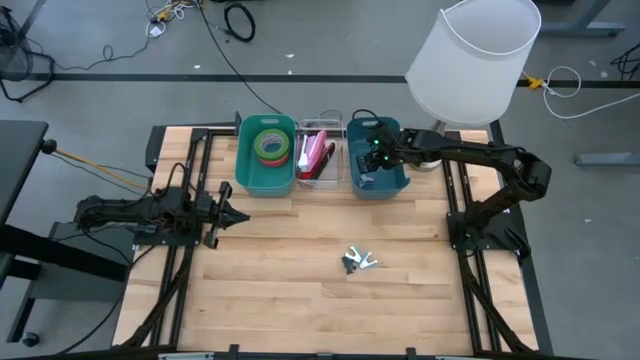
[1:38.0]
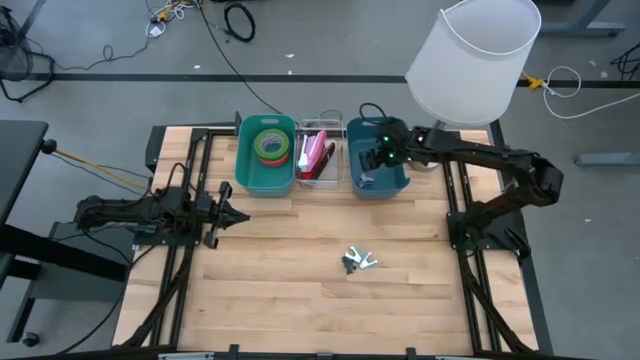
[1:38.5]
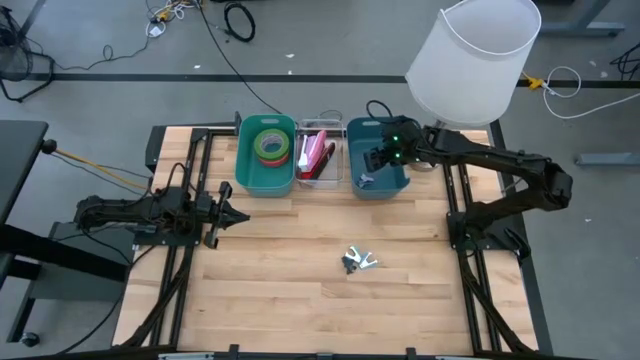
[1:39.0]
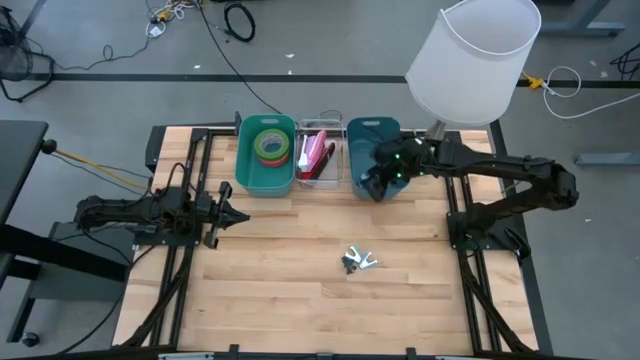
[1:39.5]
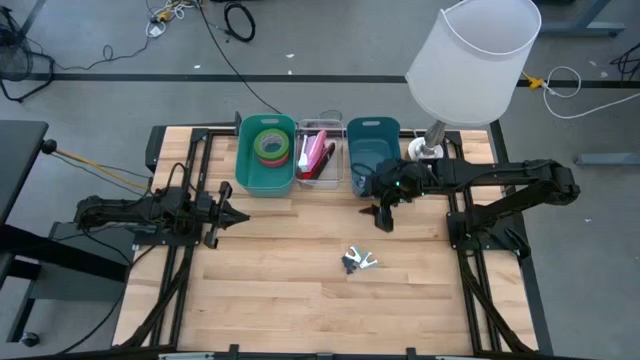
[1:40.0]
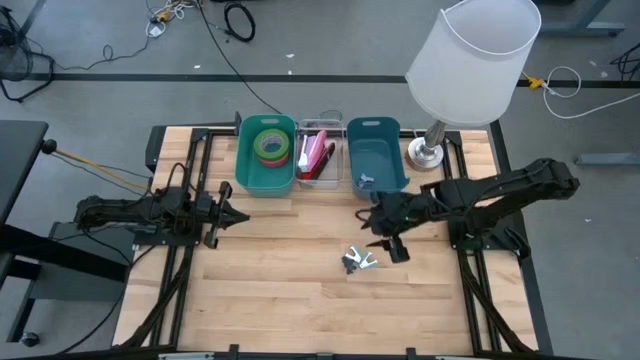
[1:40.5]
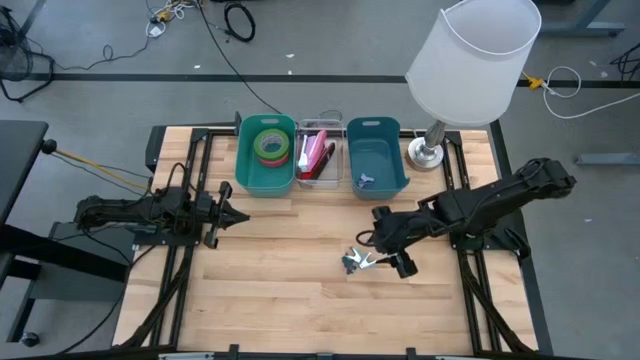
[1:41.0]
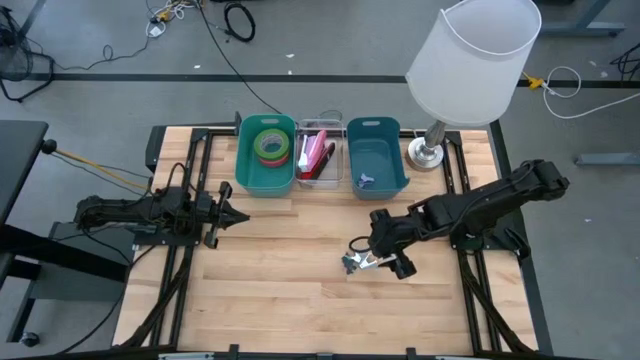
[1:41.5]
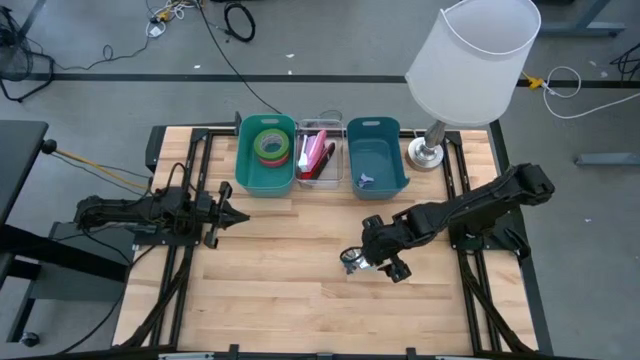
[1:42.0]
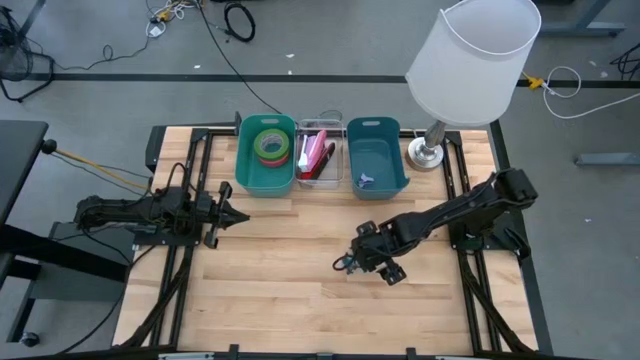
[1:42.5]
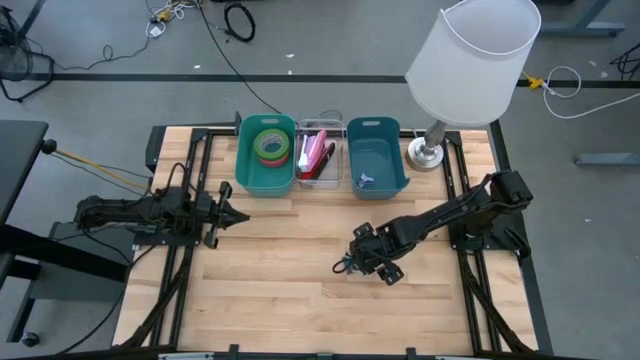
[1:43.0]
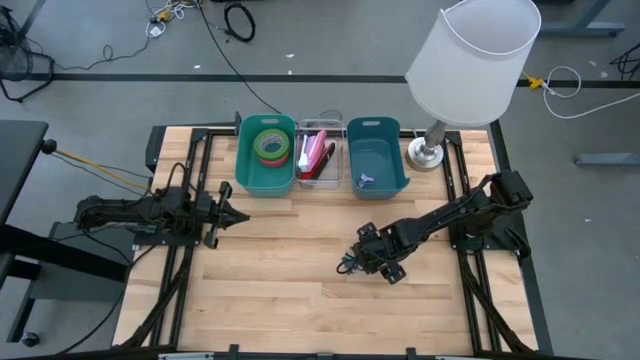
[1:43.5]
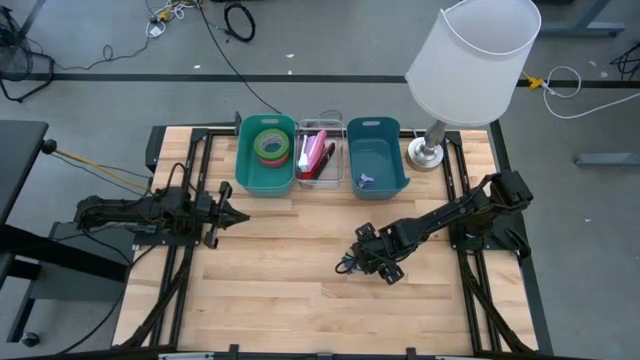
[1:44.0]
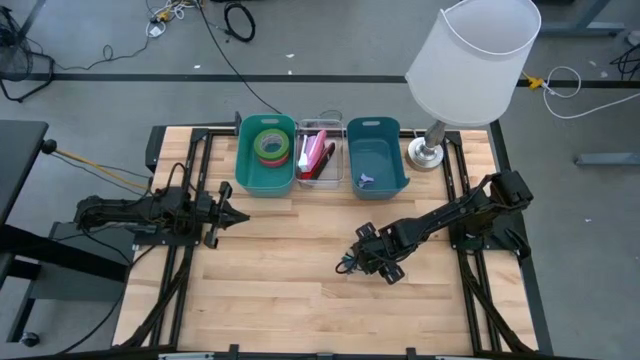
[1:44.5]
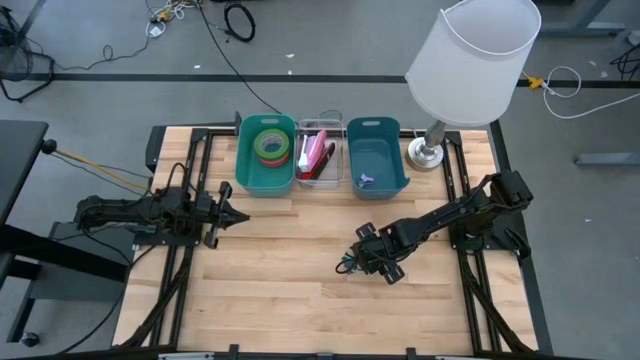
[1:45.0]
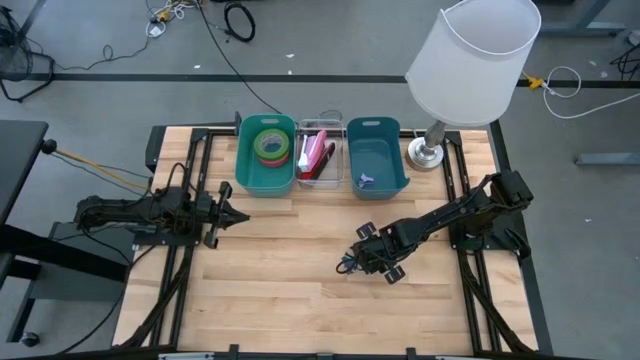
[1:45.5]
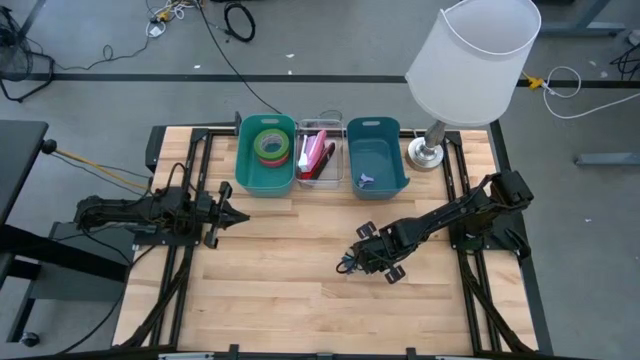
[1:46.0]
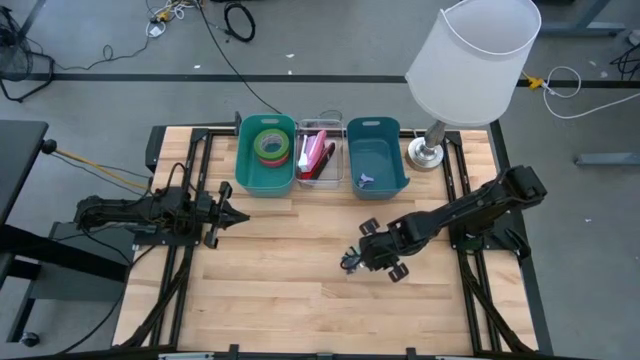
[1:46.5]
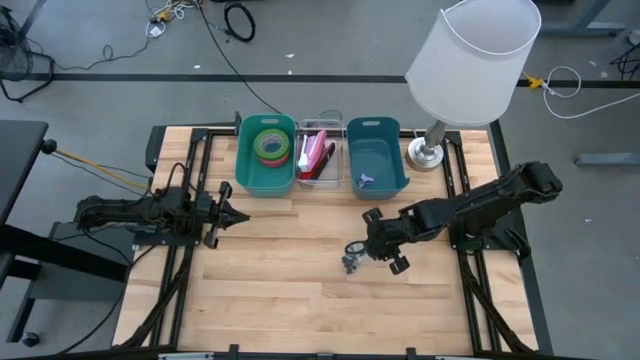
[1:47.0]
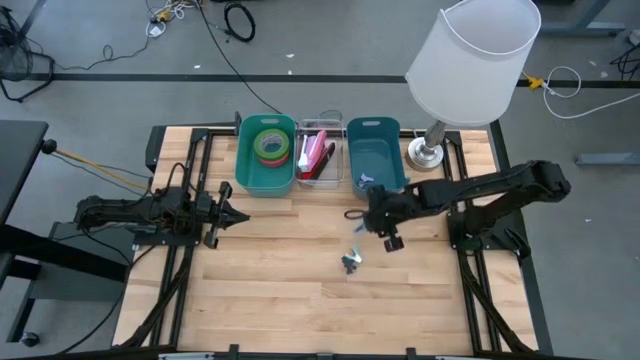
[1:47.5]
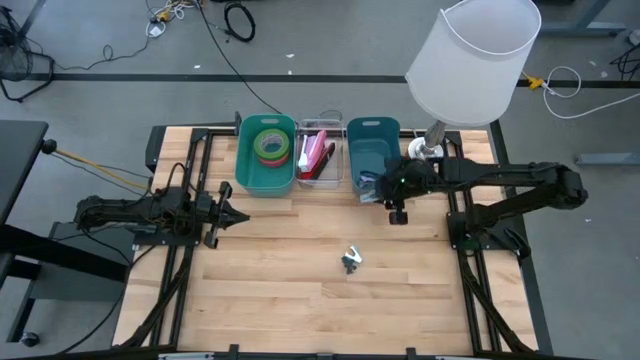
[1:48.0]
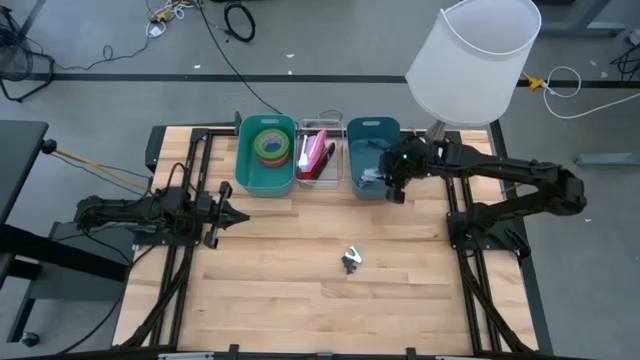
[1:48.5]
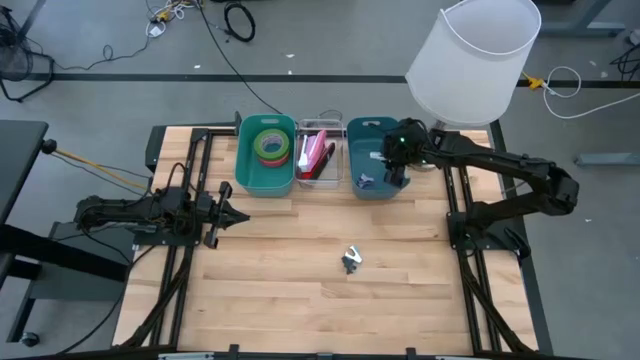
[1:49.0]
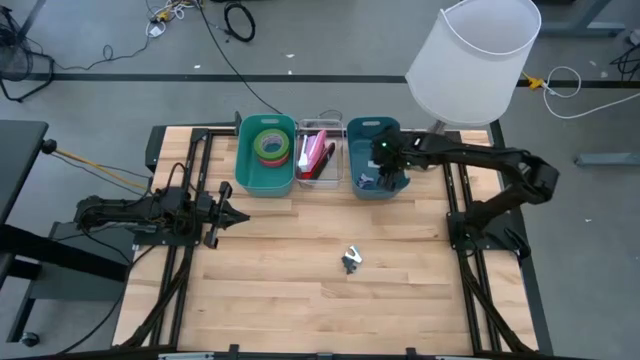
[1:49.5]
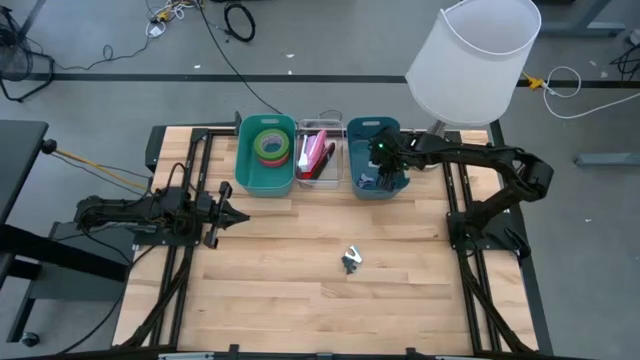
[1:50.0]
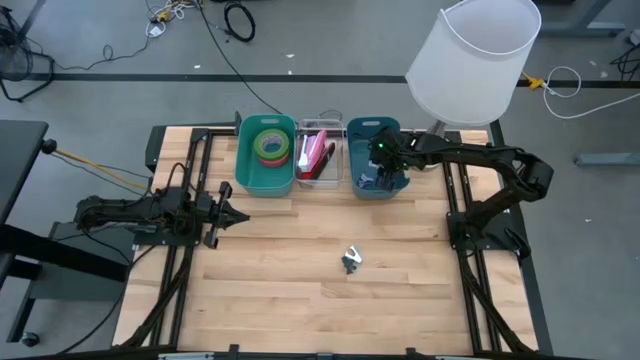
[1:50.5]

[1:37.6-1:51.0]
Task: Pick and place Stapler, Stapler remover, tape
Put the blue staple remover into the blue bin

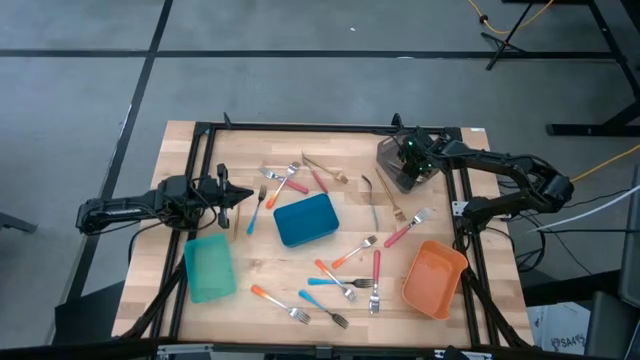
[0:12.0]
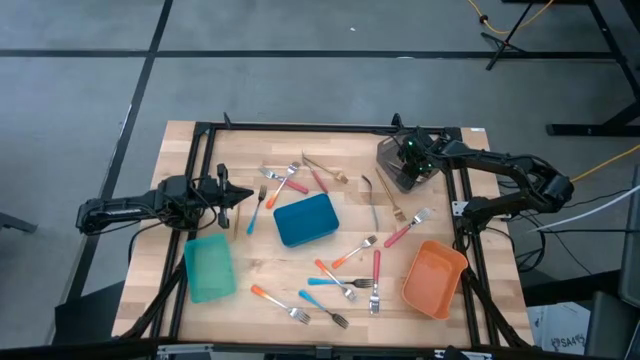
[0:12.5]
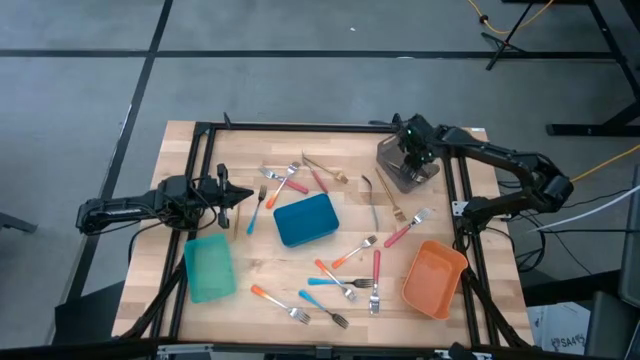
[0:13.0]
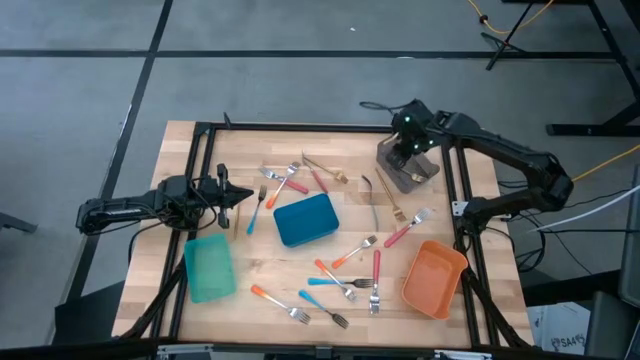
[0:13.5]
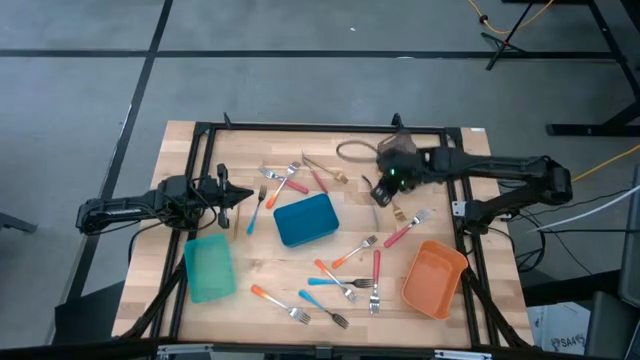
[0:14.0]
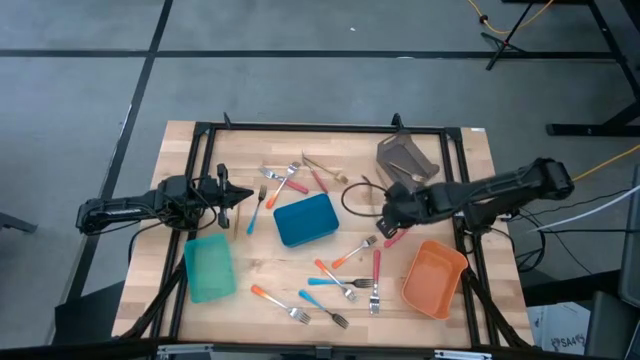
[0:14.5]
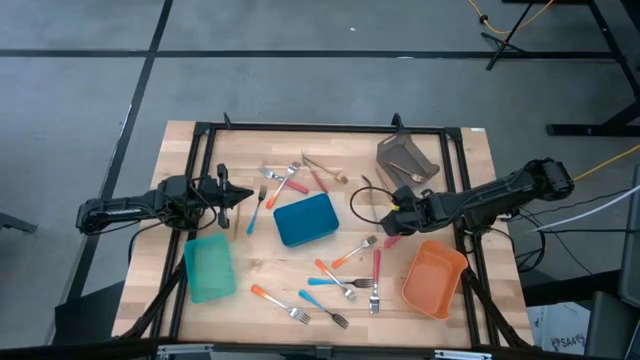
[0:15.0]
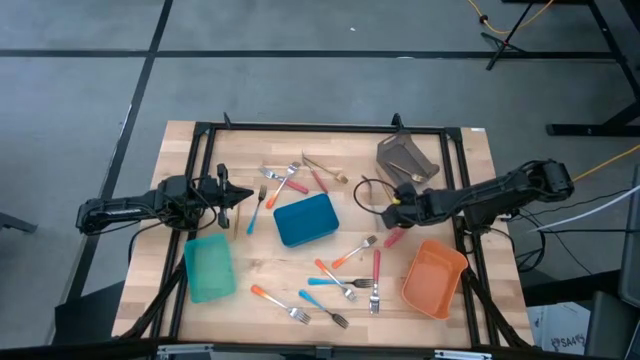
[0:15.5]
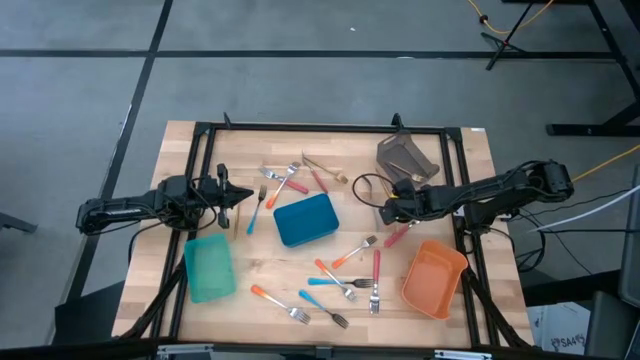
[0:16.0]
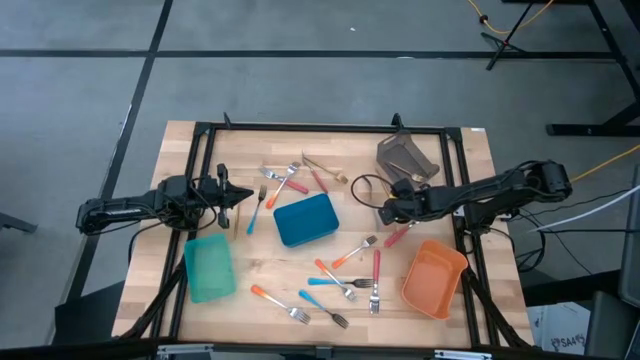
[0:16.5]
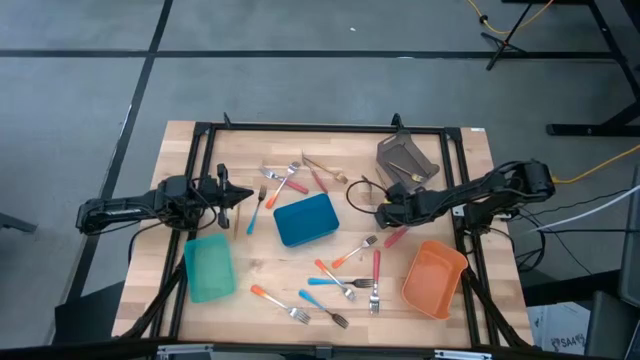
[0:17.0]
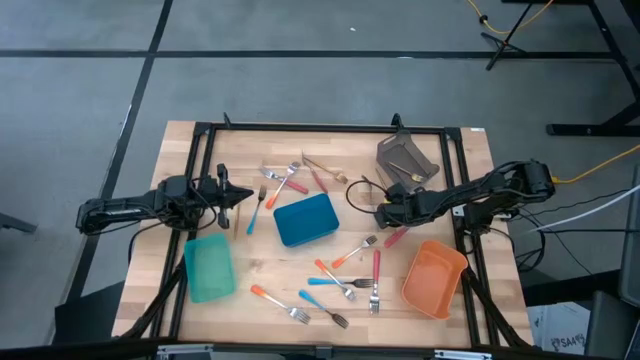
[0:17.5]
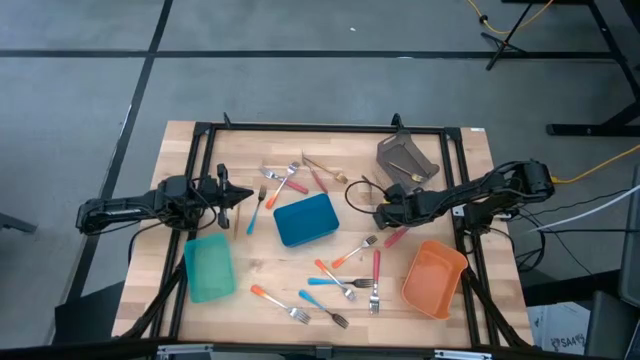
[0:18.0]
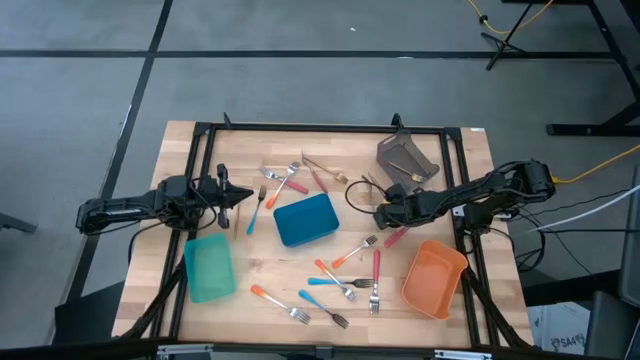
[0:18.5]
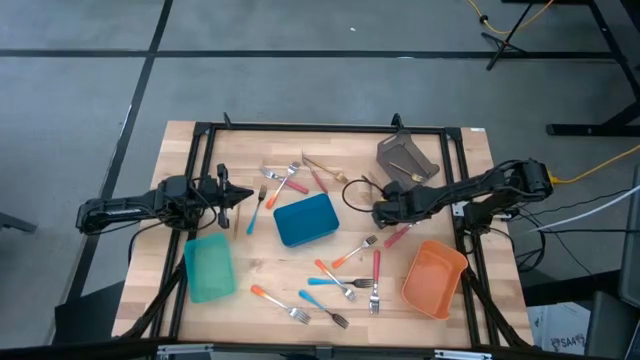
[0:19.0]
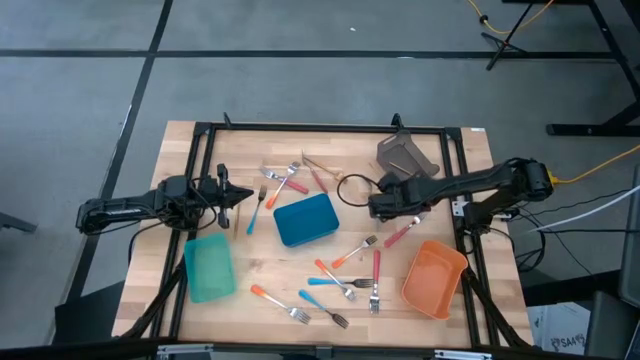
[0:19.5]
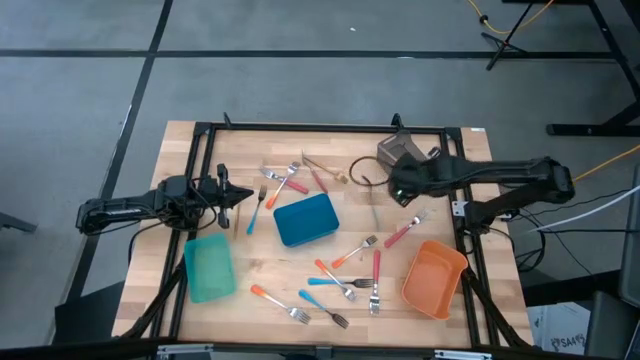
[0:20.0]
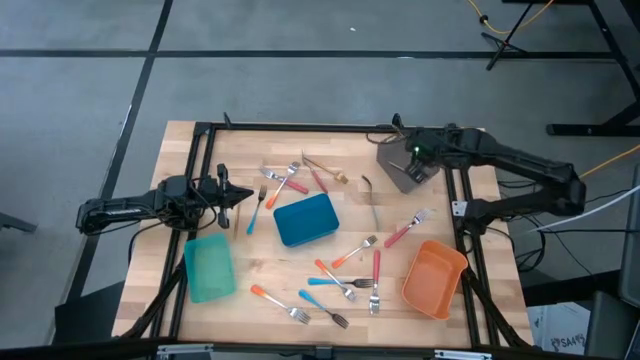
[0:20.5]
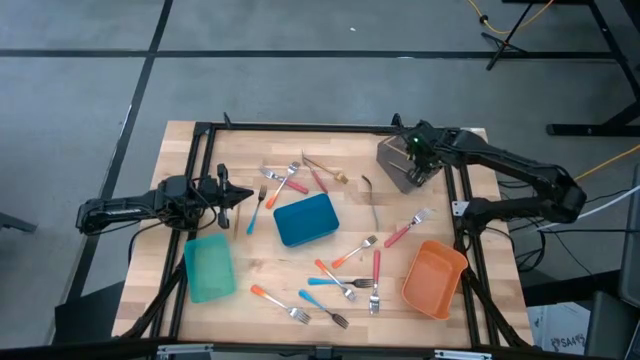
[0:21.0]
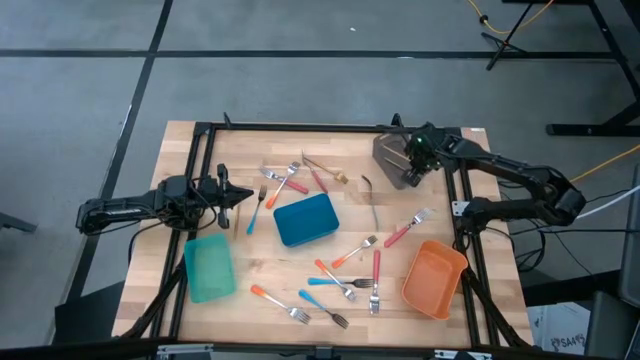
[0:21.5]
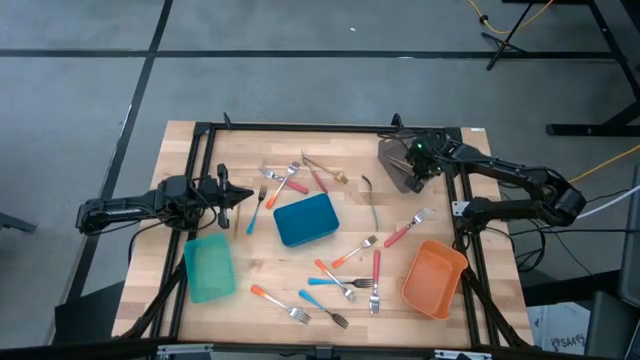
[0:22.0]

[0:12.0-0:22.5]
Task: Sort silverware by color (type)
Put the top right golden fork into the black bin
